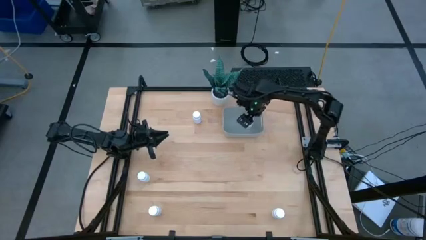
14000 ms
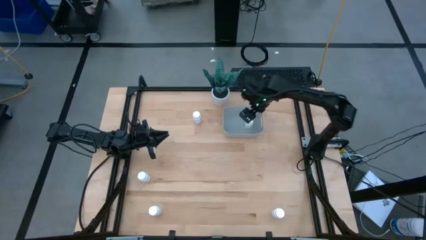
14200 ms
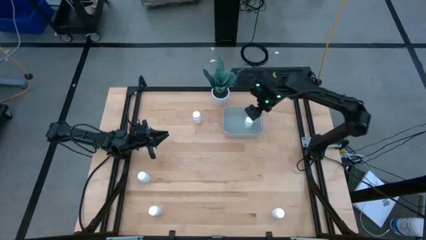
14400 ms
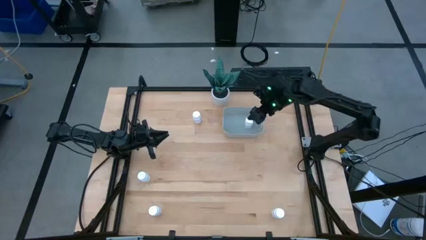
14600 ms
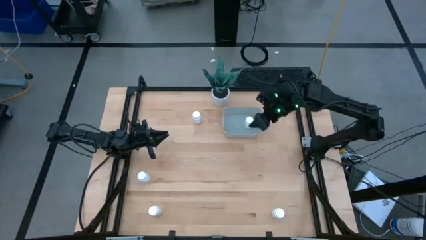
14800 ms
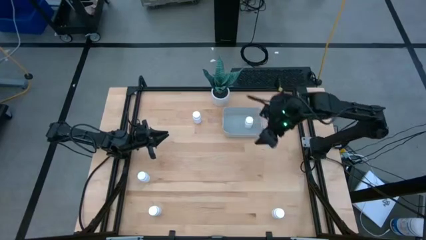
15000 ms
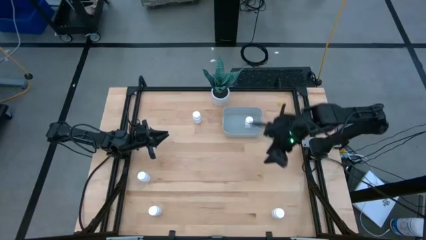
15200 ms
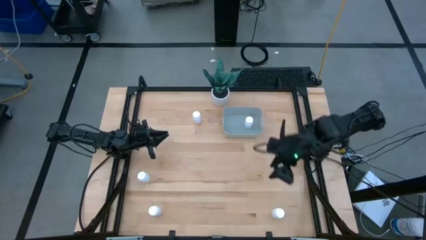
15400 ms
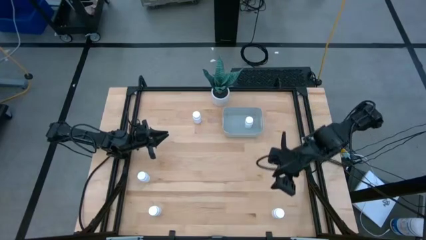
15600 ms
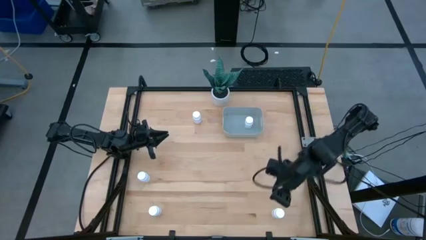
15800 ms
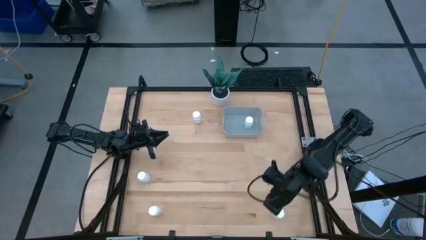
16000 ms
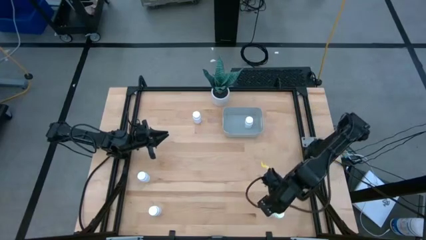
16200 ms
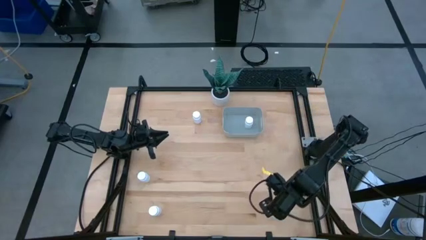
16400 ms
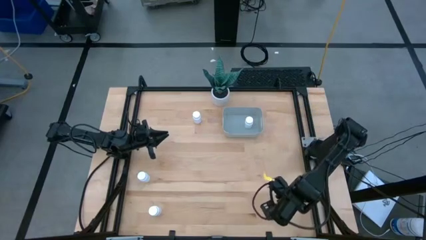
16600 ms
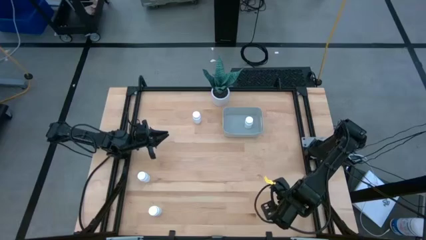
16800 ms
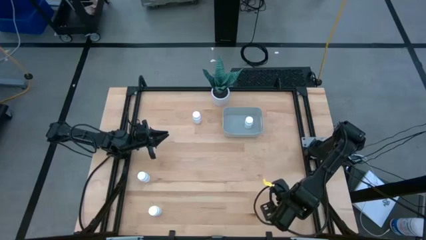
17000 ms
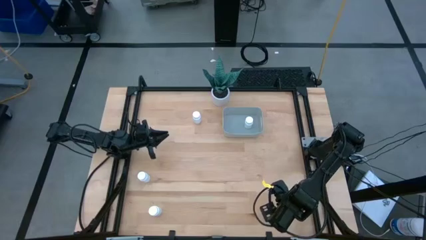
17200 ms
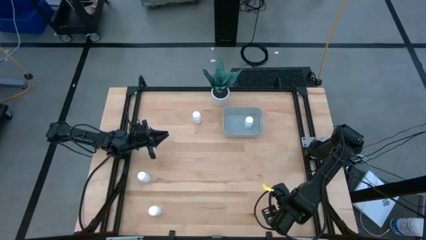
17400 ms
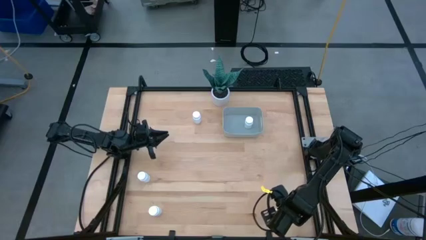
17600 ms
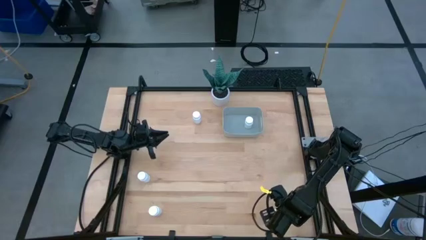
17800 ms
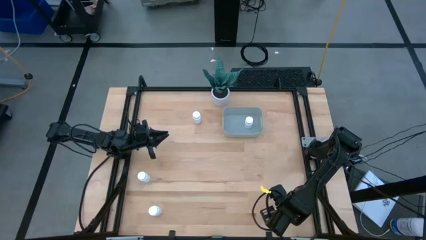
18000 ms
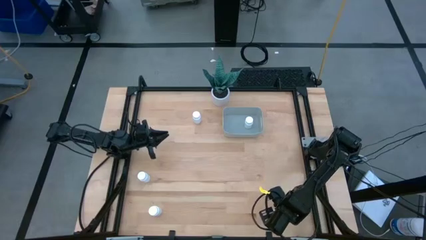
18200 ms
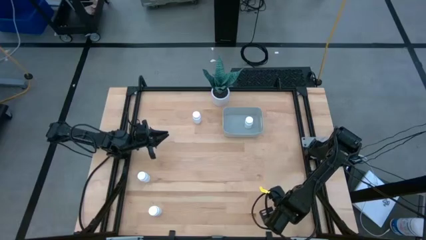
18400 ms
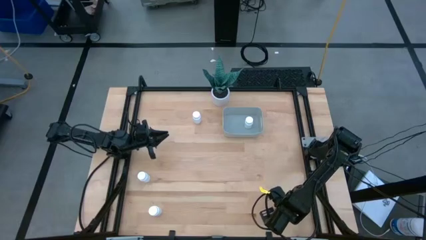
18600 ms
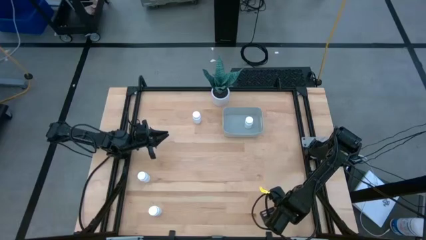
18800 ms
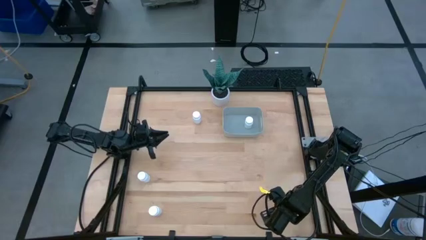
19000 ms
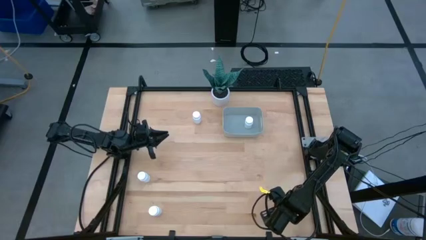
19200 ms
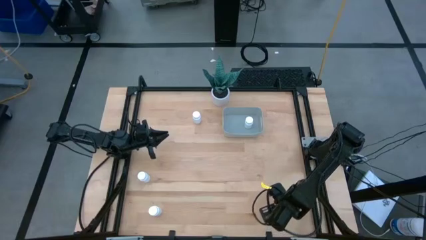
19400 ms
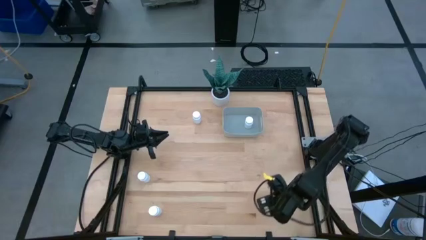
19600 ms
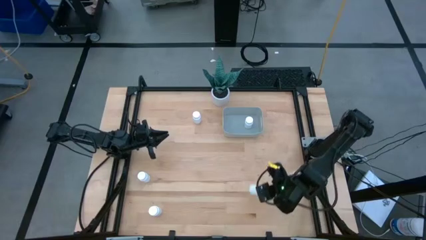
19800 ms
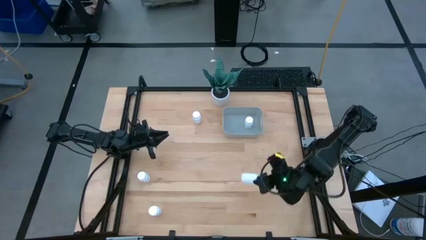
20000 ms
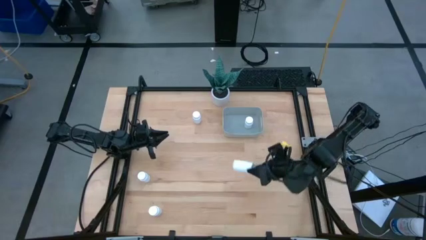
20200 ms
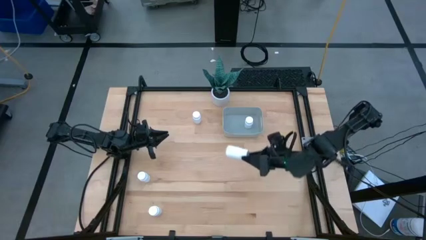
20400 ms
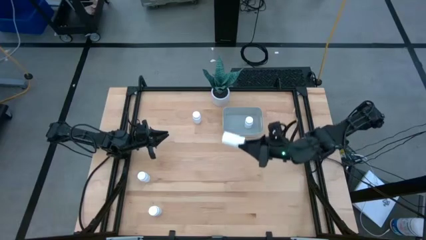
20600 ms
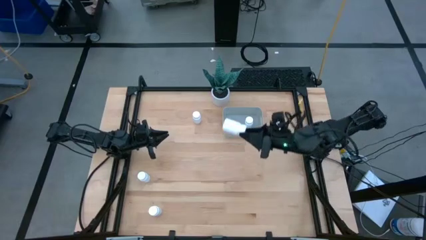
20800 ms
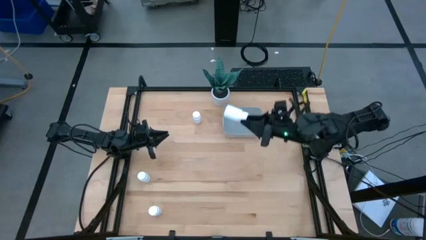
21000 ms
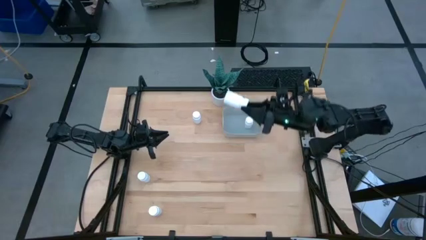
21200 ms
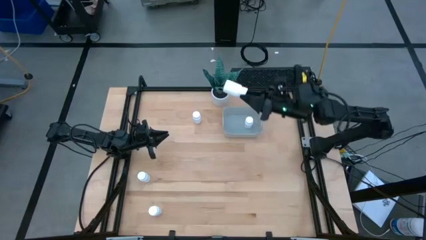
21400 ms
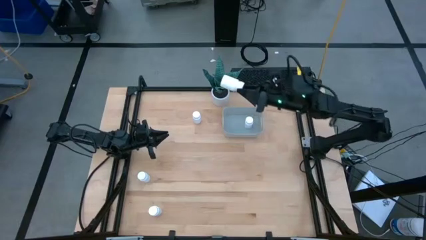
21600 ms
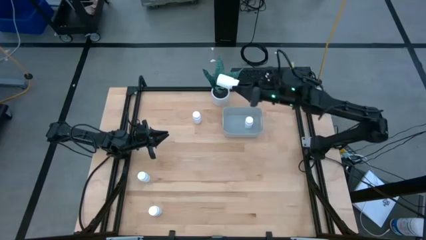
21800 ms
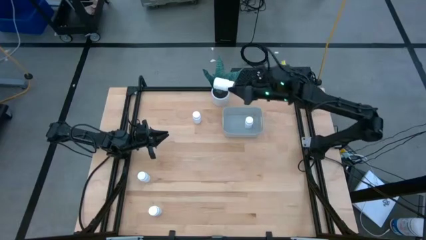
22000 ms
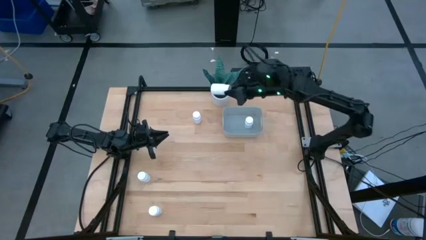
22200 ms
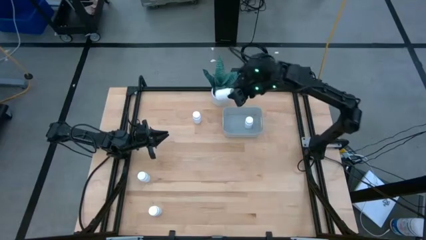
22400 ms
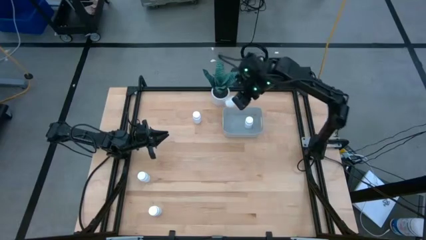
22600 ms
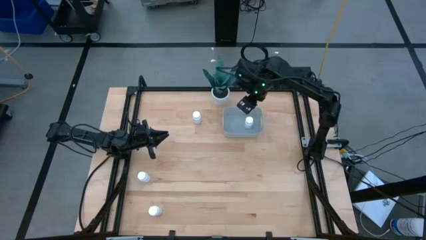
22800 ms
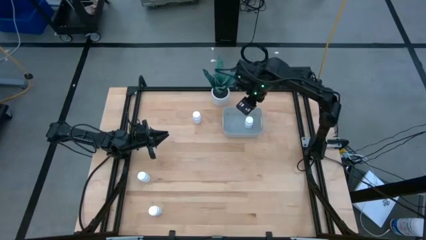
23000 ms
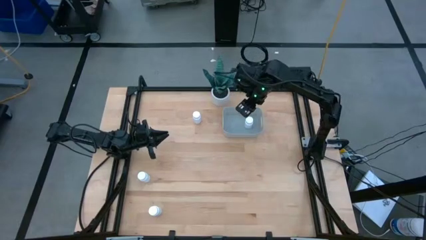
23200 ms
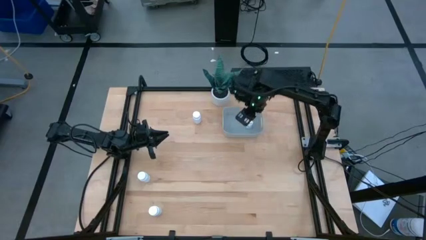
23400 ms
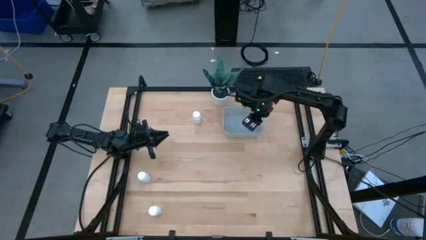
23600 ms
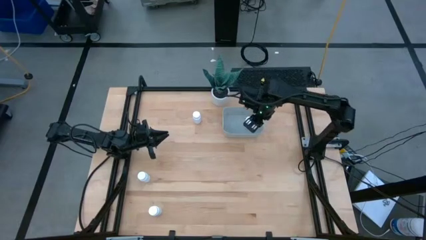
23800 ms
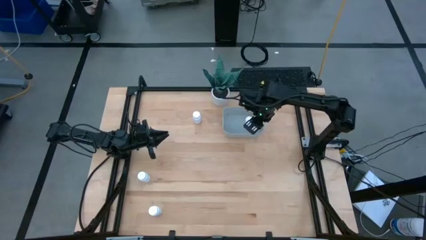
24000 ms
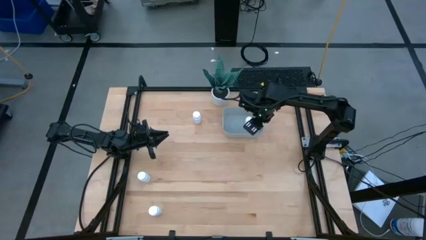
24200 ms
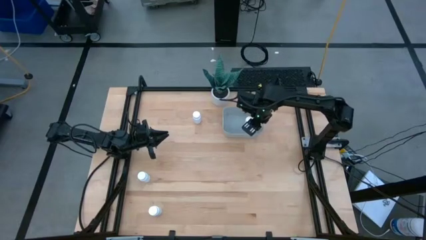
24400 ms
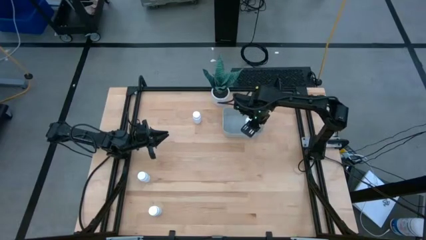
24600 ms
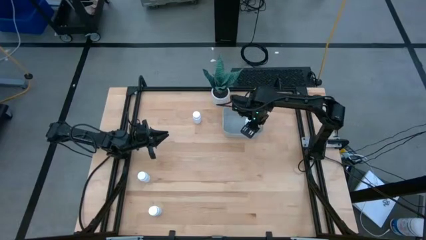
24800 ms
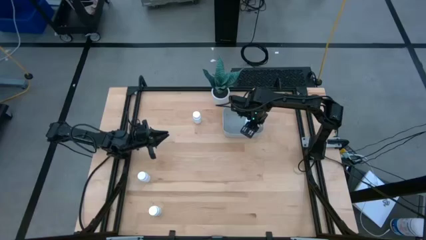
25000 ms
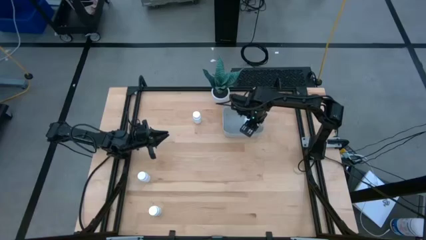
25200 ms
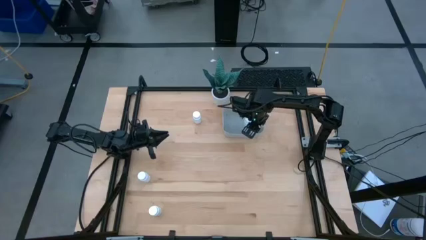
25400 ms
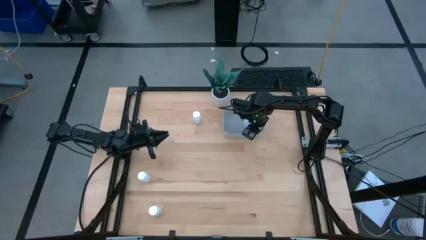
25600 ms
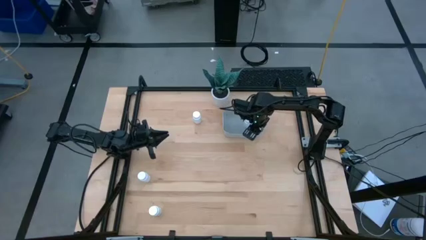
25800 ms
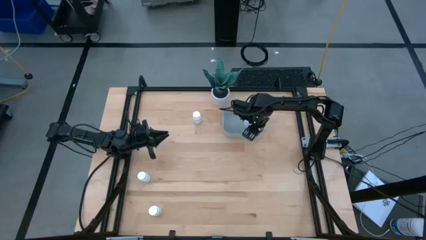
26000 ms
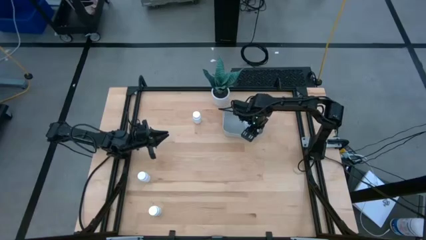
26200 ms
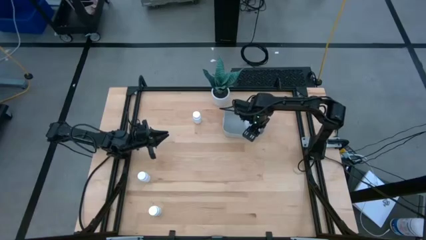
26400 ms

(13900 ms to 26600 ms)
Task: Pick and place pill bottles into a basket
Put the white pill bottle into the gray bin
